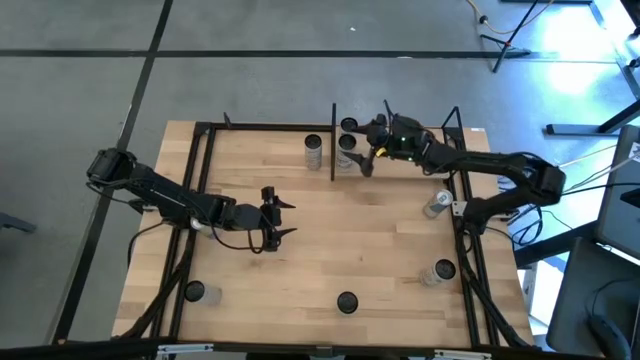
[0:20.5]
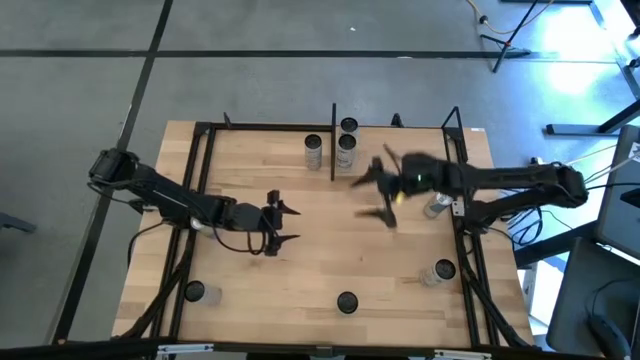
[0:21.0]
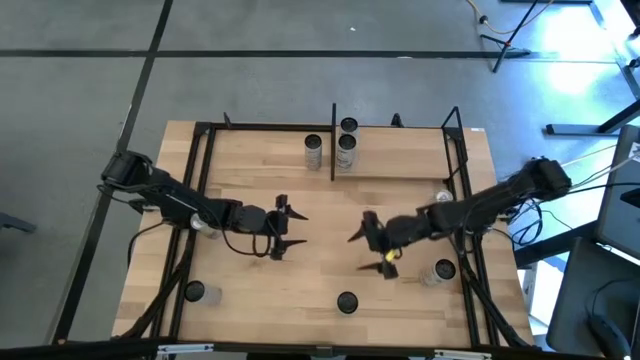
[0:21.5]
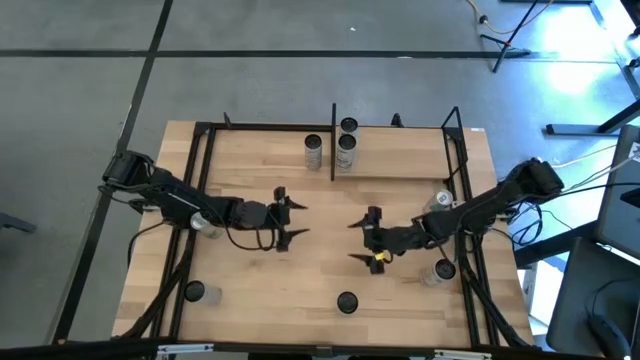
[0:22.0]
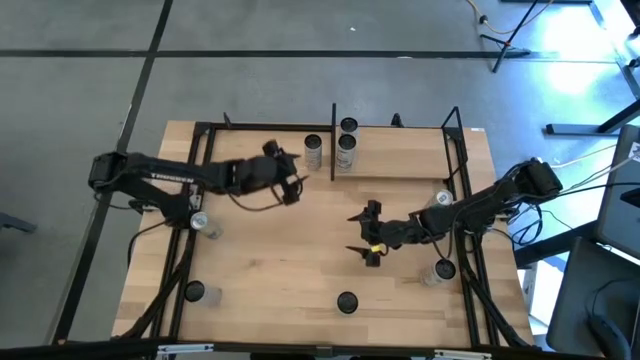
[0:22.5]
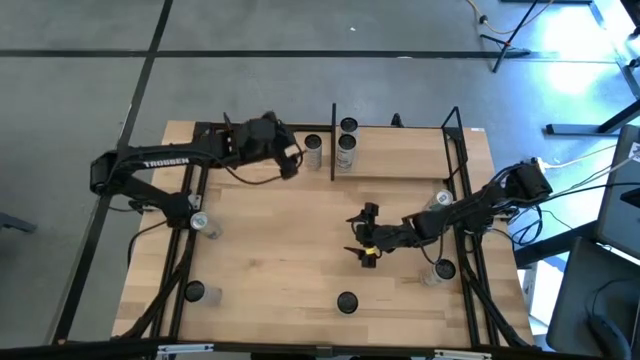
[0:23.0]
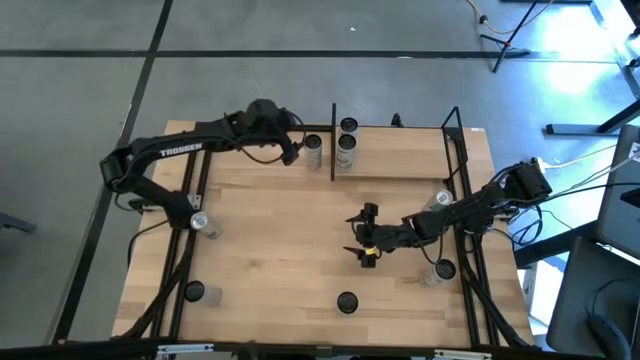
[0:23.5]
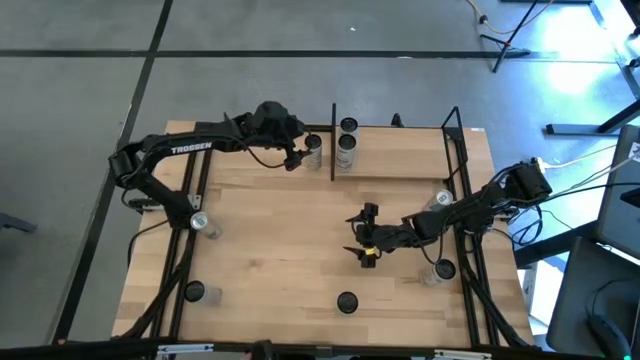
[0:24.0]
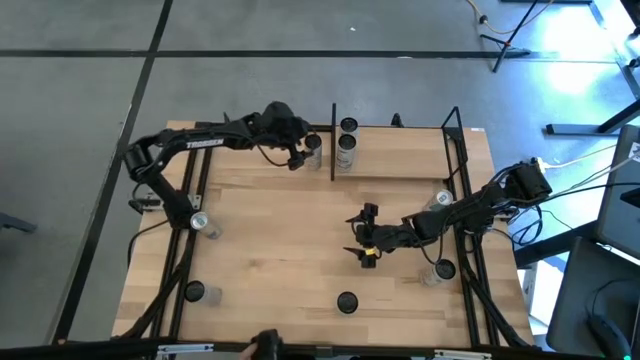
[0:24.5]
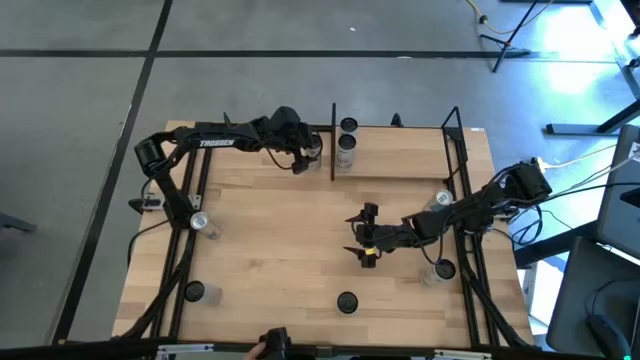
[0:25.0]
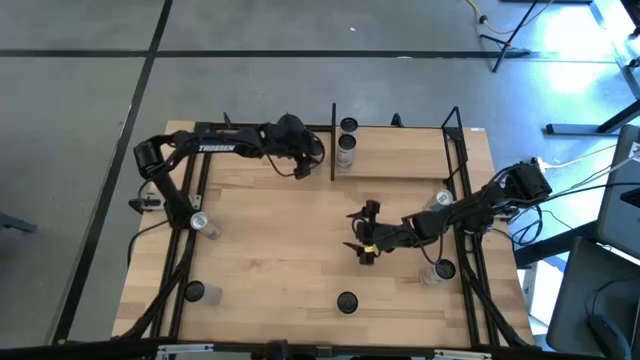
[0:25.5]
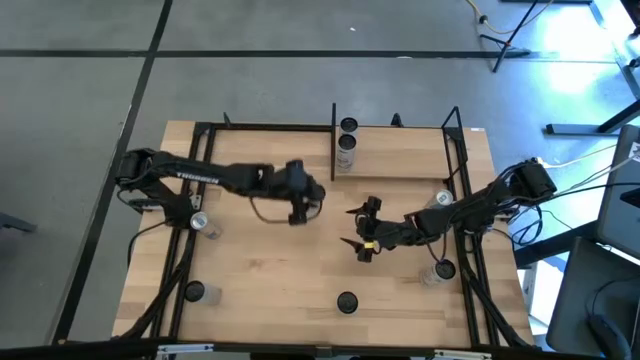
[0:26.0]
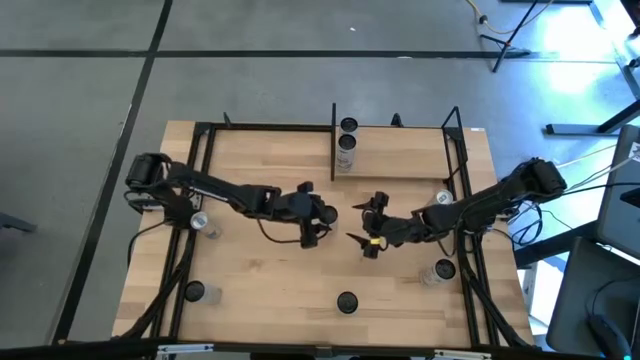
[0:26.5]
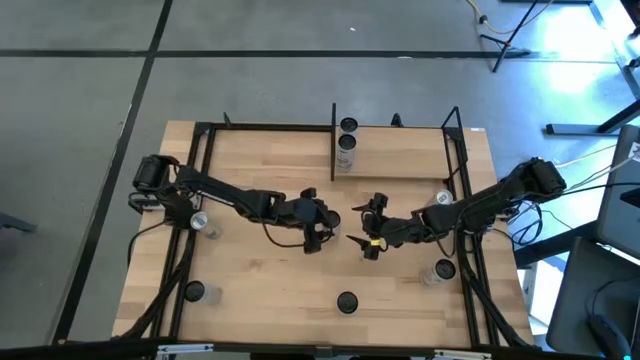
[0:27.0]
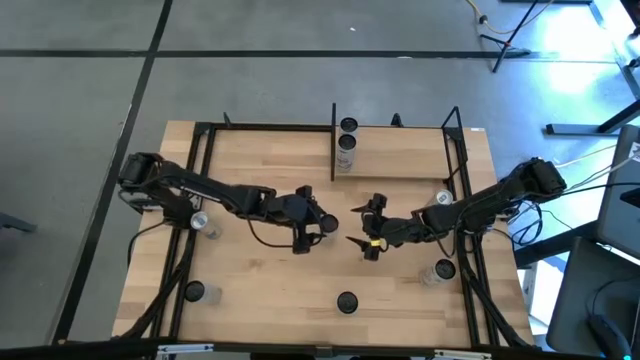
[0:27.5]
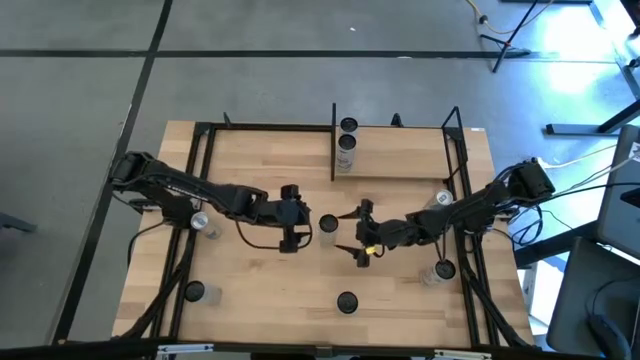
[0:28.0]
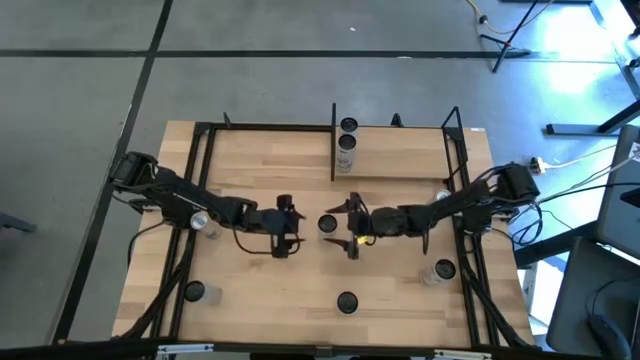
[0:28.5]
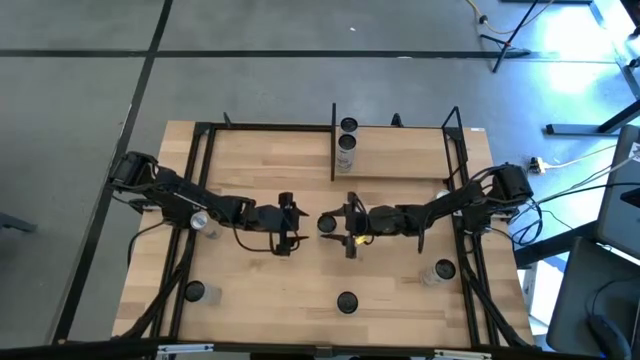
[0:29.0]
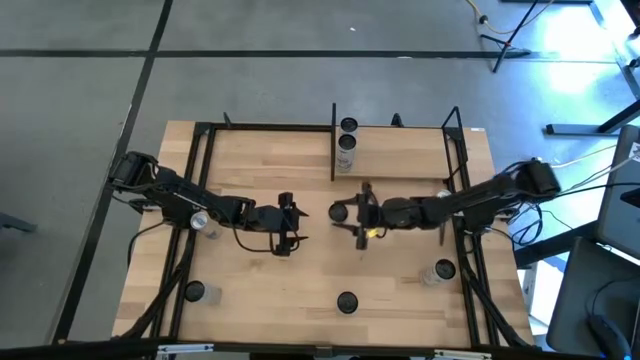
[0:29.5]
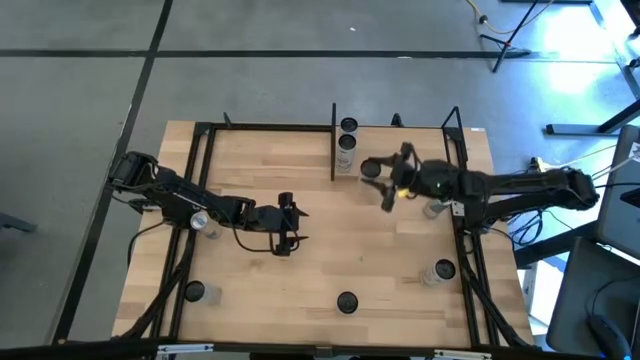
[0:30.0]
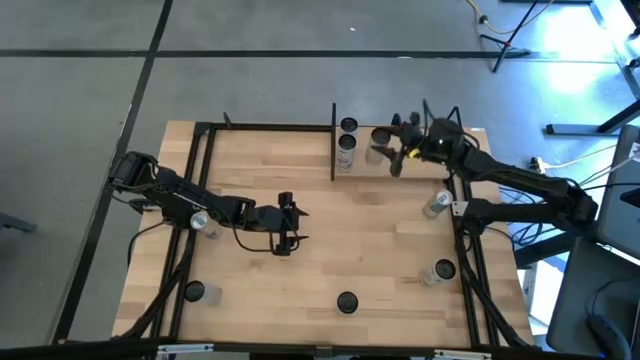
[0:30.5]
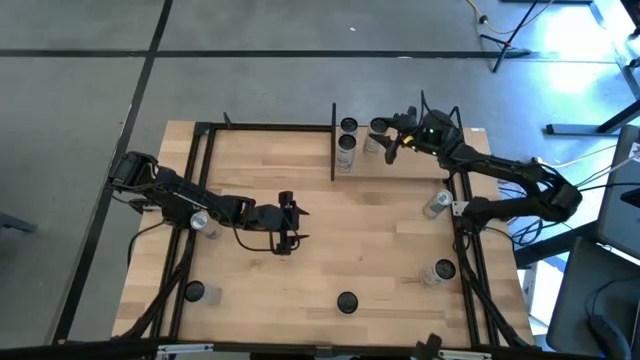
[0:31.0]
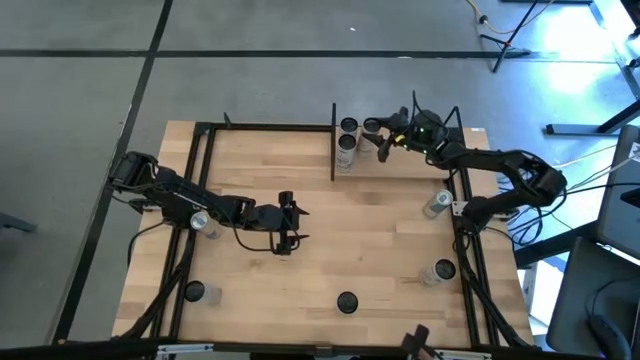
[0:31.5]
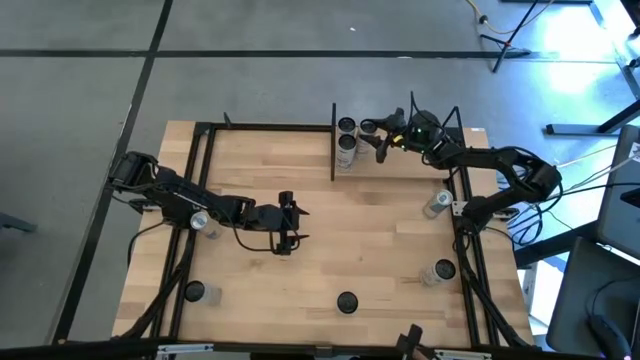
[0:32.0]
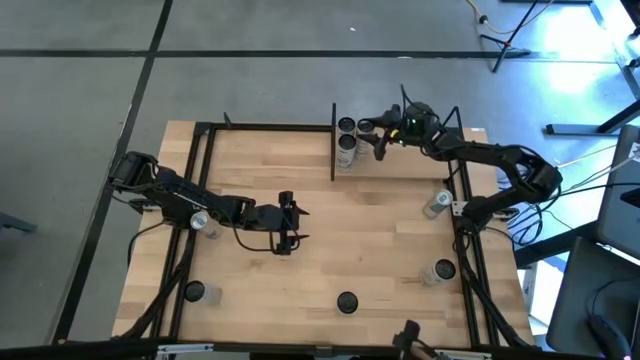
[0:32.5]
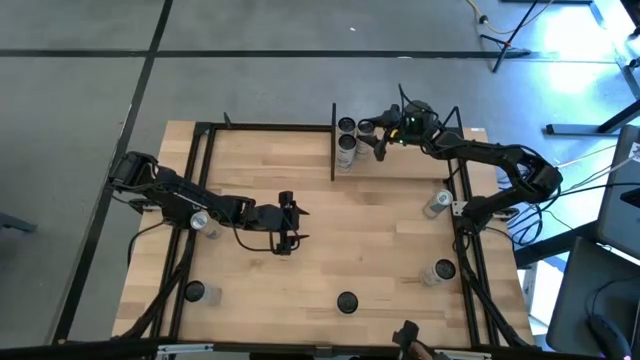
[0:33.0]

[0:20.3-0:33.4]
Task: Place canned beverage on shelf
Put the top white-yellow soda can on the shelf
